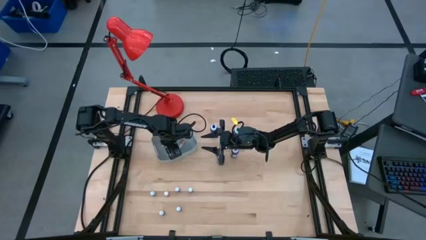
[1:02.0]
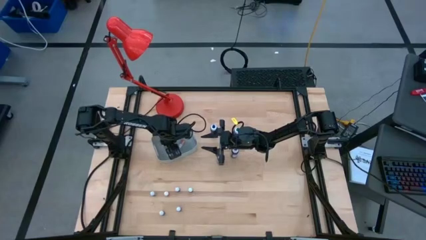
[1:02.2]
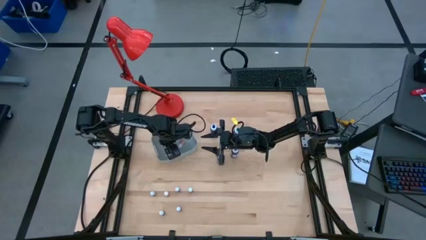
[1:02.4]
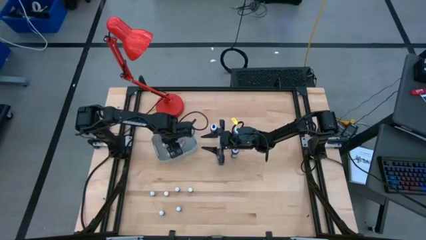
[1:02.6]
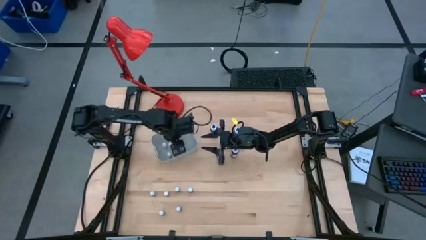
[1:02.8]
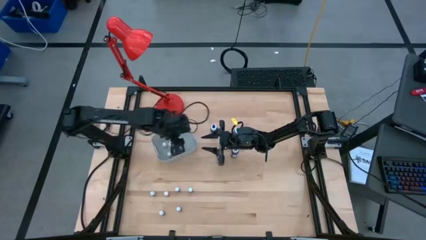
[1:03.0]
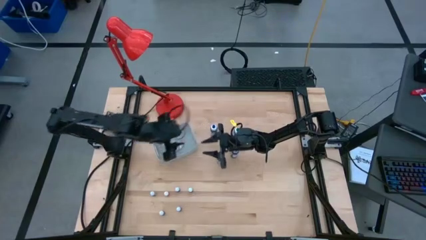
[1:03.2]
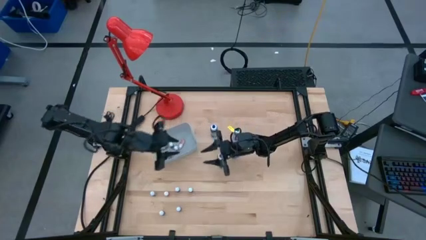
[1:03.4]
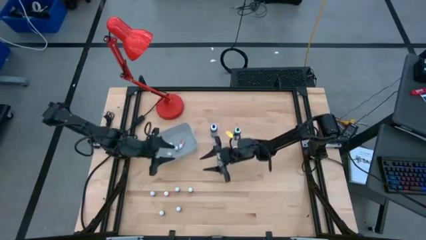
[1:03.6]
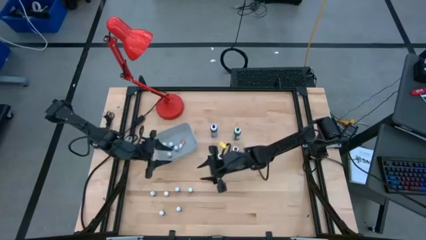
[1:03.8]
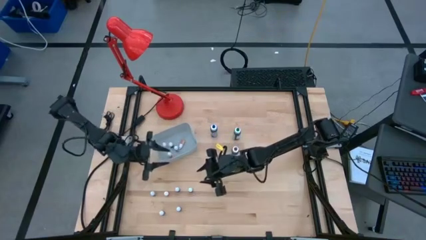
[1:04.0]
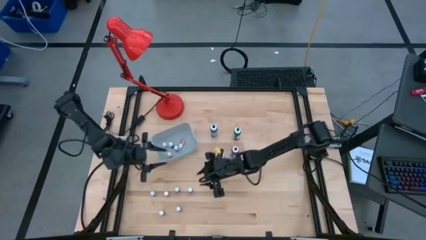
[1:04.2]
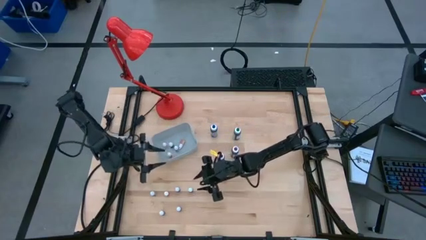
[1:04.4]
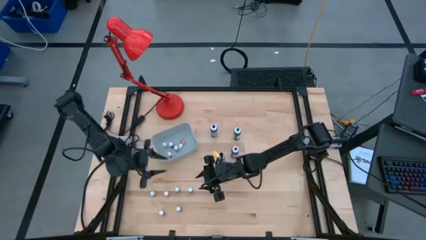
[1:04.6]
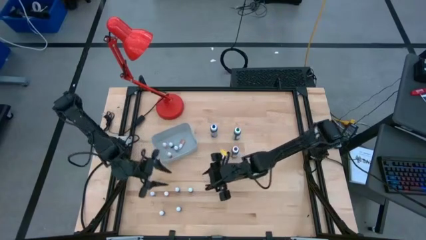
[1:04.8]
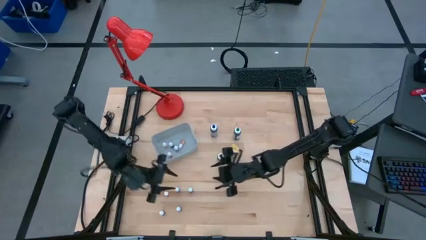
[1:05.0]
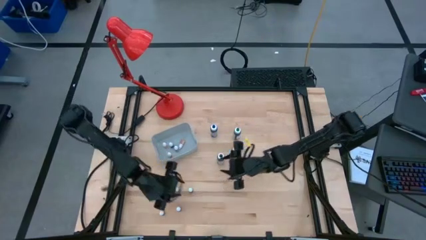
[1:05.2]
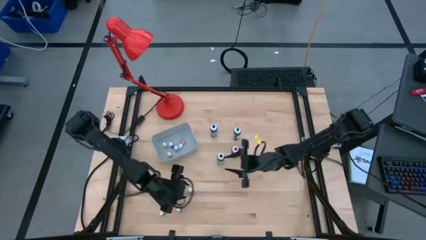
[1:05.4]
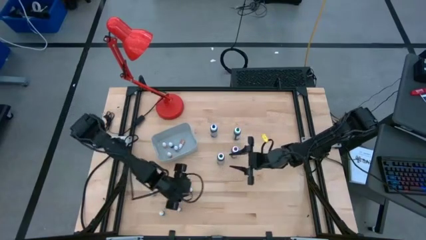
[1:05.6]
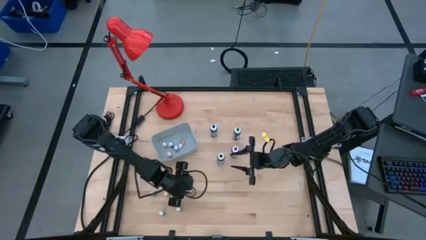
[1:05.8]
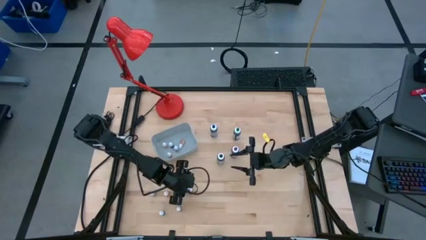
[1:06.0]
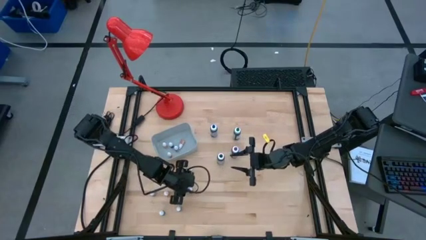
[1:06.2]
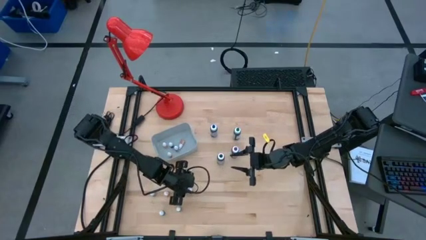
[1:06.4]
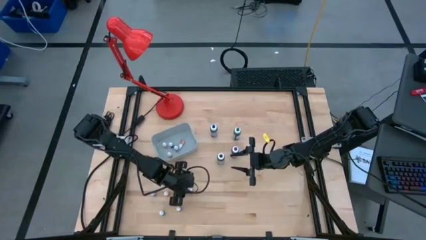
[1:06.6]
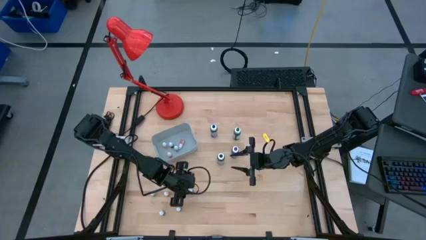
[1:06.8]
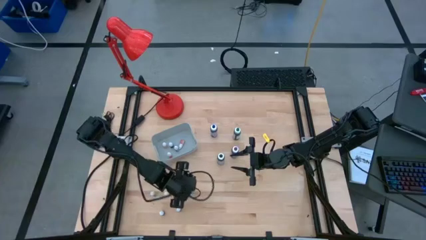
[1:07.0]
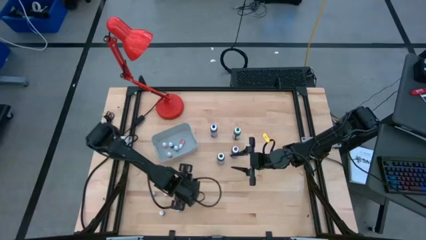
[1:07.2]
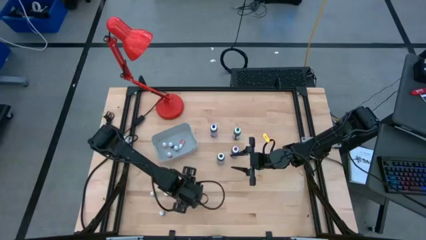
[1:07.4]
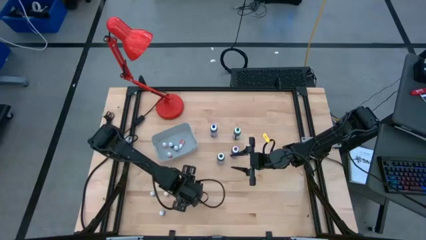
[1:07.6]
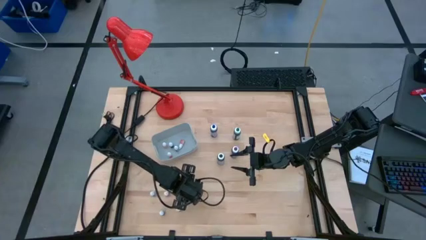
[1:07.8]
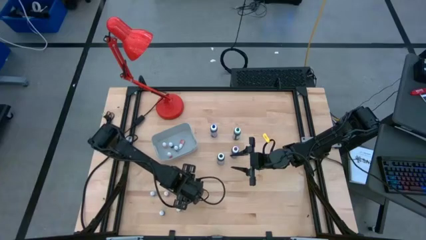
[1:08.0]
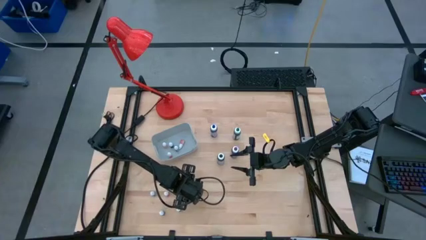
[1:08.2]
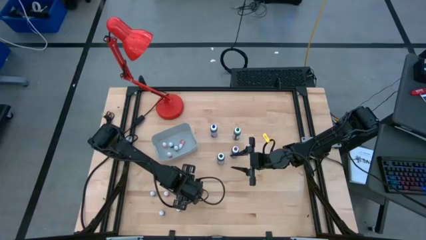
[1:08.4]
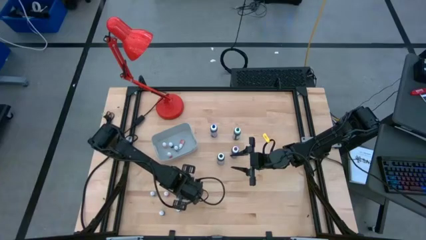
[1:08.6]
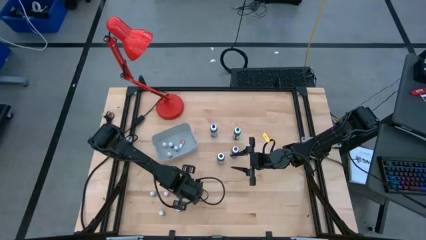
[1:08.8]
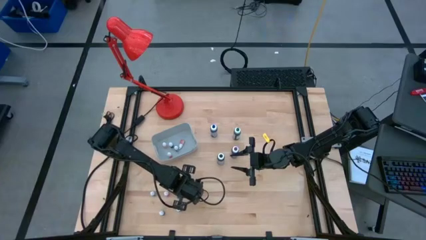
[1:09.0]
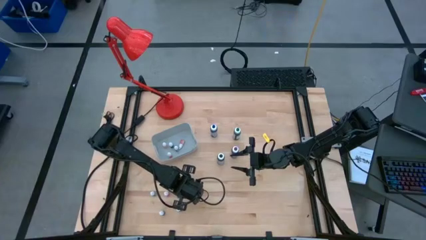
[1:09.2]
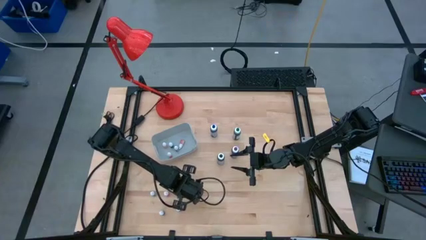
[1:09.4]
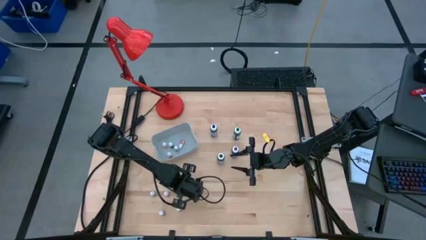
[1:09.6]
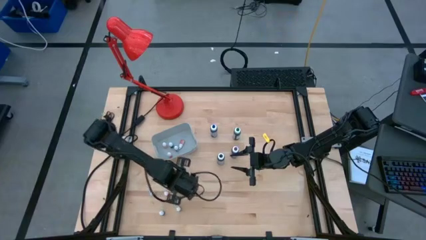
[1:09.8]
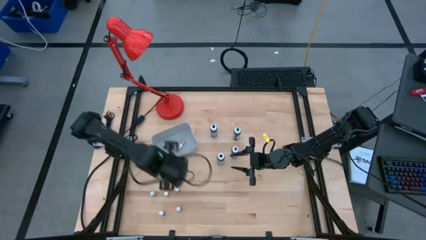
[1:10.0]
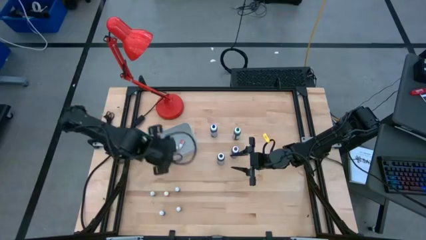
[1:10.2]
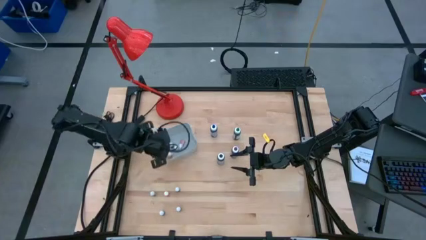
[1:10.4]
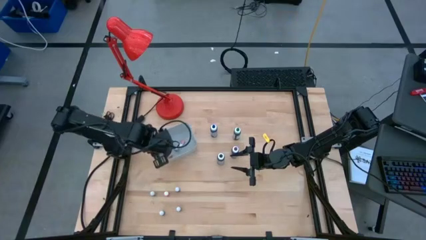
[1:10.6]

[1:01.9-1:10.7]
Task: Pick & Place food coloring
Put the top small purple coloring bottle into the gray container

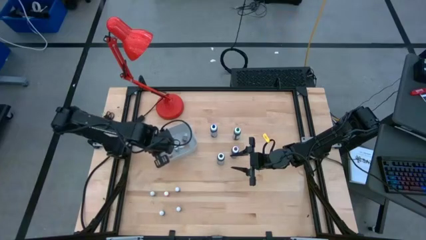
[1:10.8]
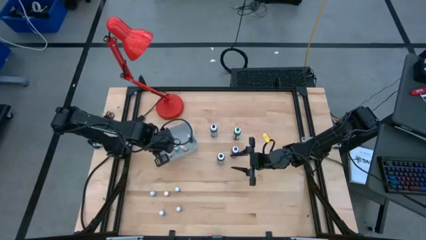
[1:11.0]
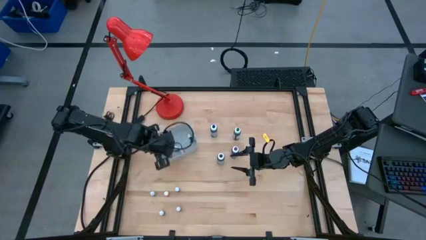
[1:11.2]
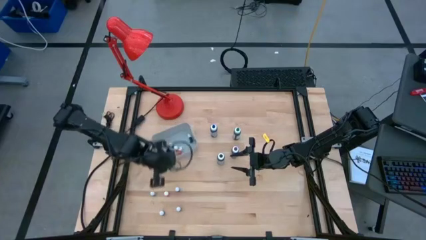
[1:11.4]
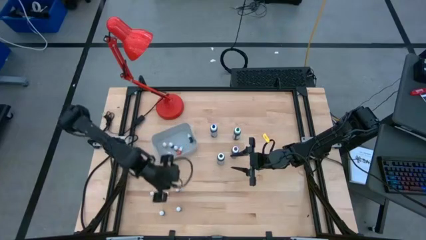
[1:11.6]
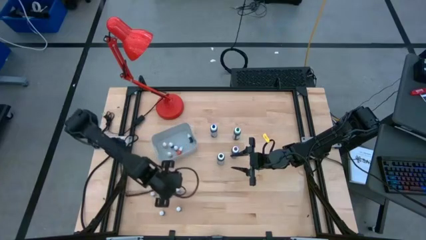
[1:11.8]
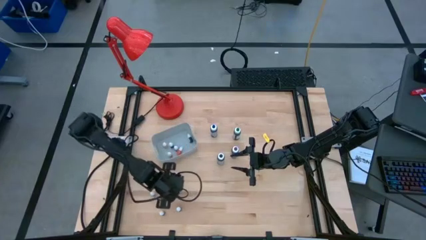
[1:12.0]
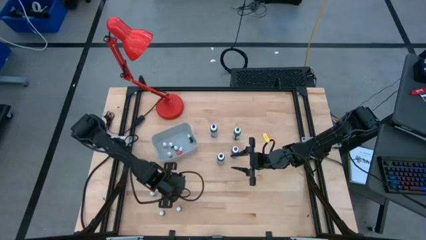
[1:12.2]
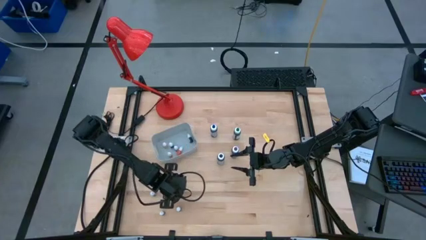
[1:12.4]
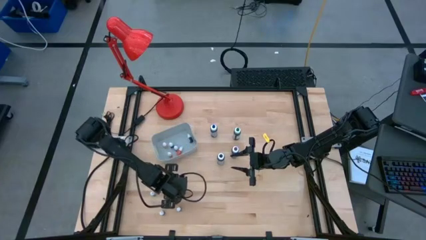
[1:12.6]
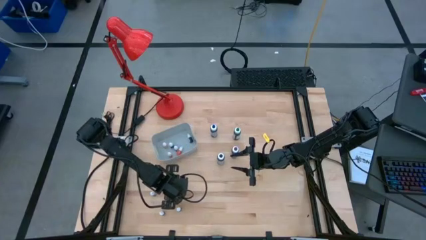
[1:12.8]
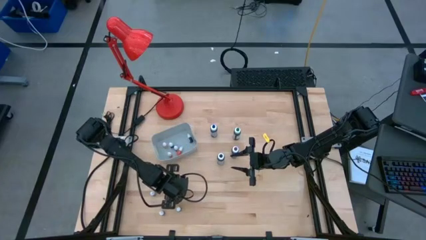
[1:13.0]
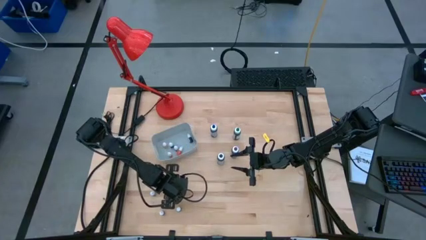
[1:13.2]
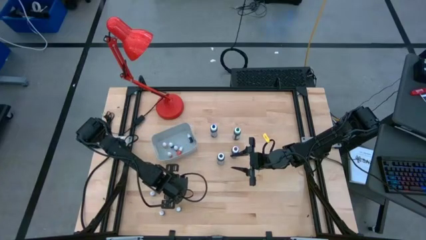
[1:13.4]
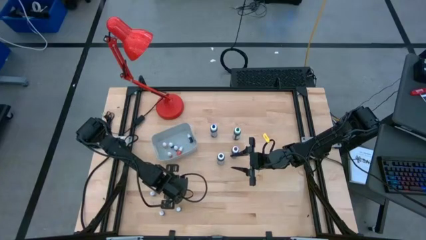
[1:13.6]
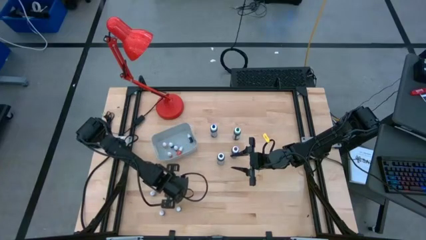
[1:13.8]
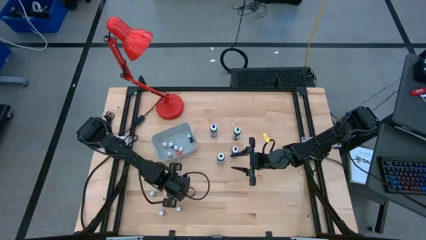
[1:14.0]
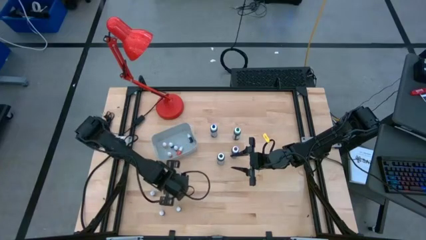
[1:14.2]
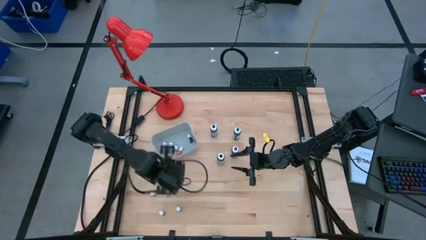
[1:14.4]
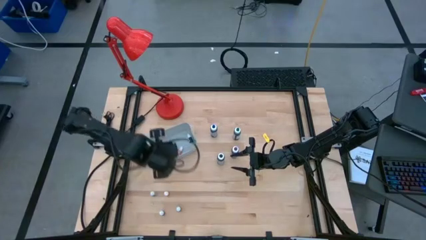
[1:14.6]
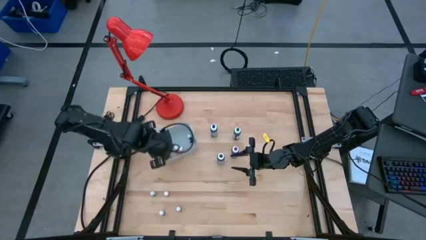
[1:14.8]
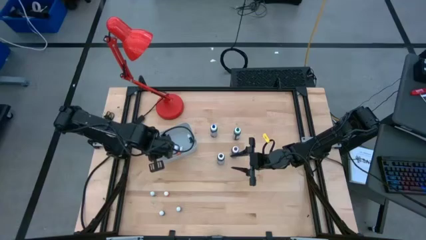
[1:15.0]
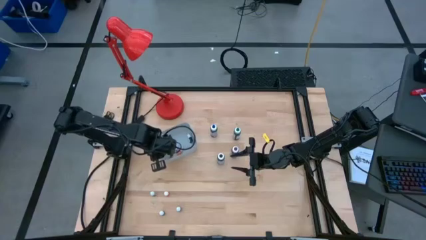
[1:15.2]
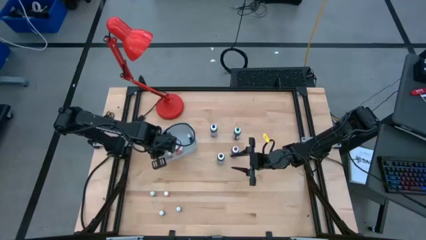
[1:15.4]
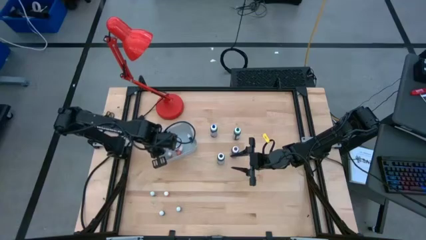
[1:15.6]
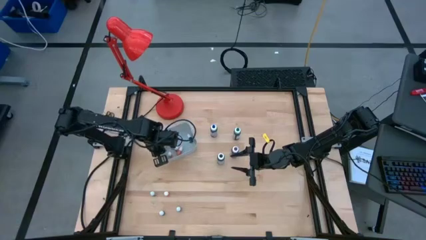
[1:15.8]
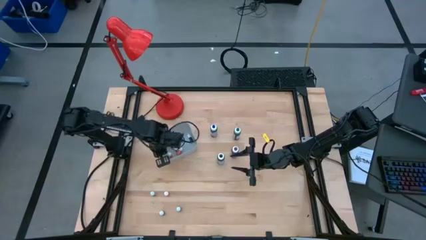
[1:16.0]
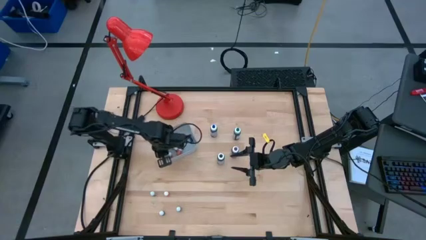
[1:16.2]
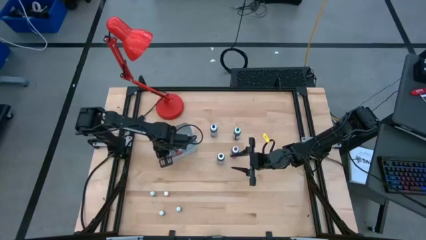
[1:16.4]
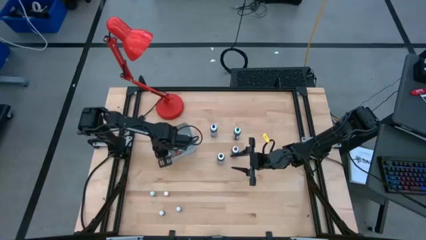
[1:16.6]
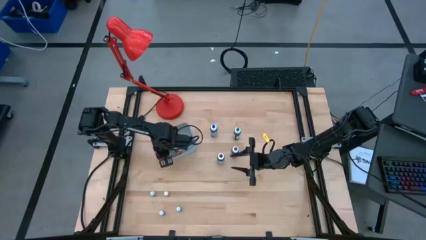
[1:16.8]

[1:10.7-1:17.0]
Put the small blue coloring bottle into the gray container
